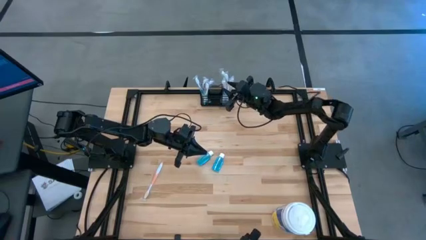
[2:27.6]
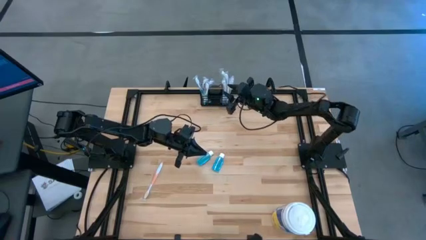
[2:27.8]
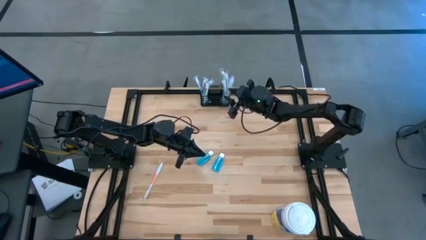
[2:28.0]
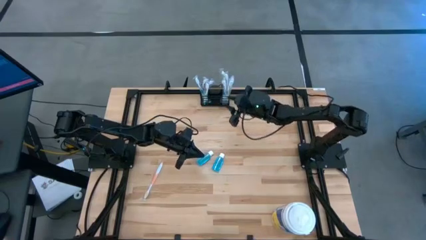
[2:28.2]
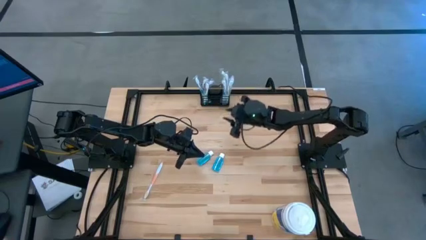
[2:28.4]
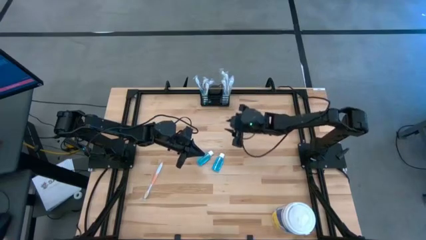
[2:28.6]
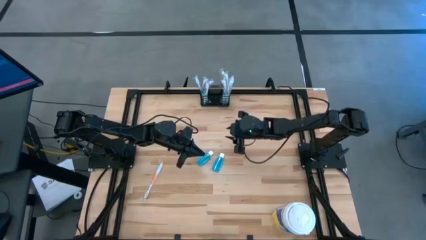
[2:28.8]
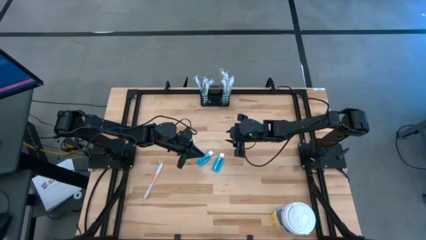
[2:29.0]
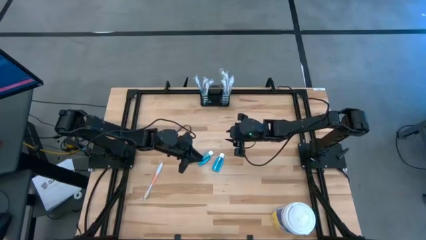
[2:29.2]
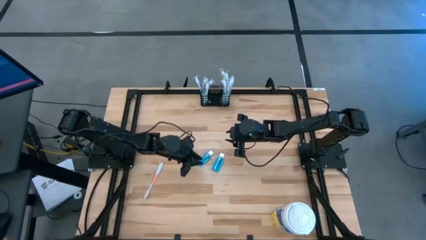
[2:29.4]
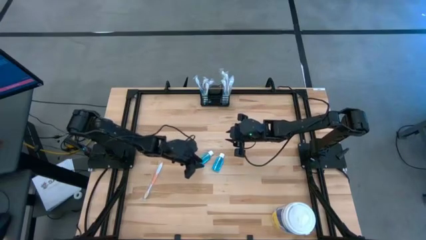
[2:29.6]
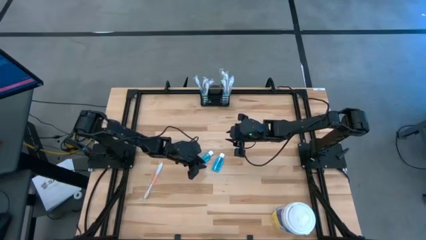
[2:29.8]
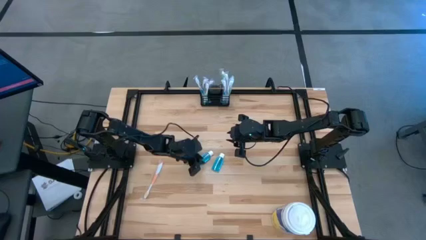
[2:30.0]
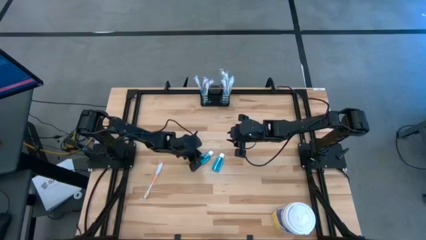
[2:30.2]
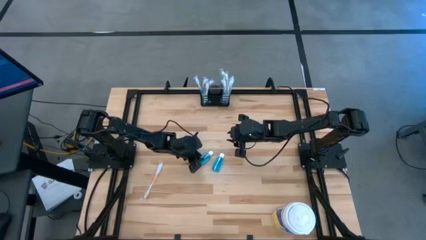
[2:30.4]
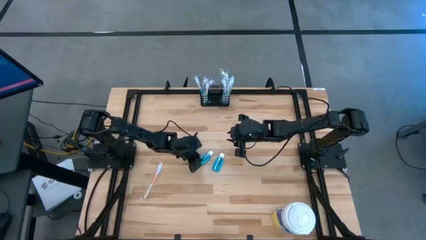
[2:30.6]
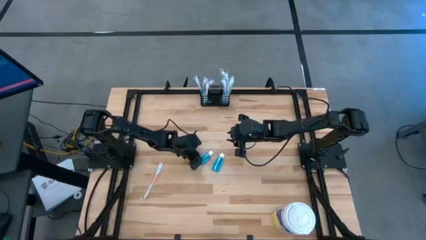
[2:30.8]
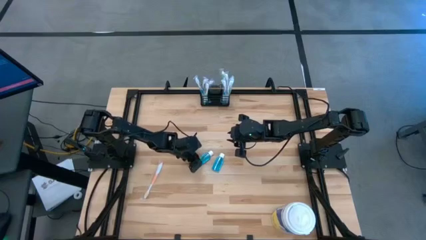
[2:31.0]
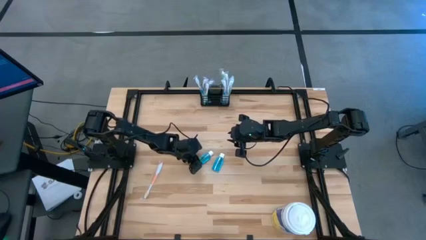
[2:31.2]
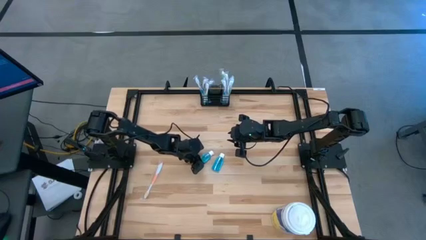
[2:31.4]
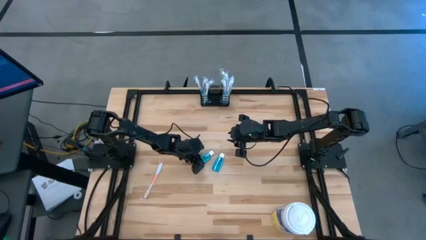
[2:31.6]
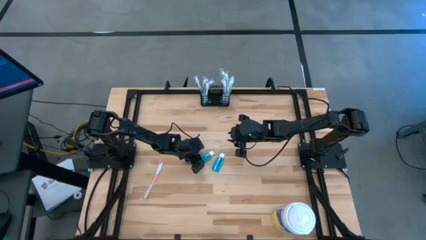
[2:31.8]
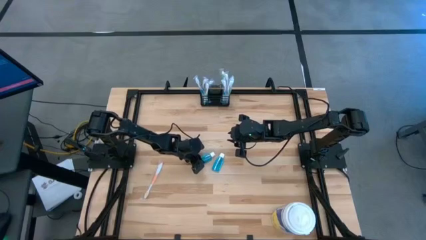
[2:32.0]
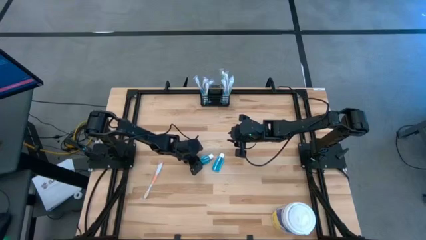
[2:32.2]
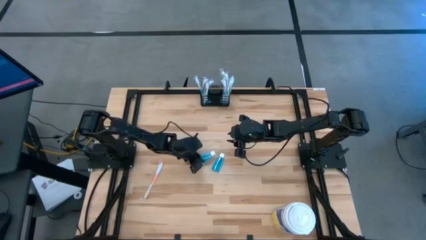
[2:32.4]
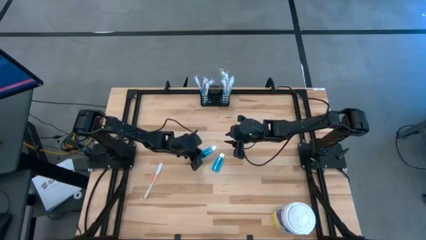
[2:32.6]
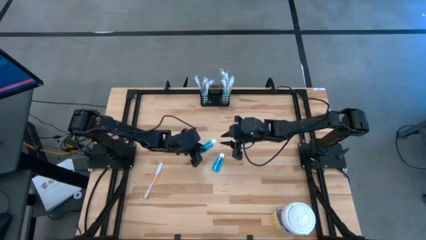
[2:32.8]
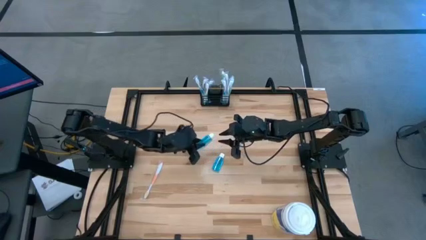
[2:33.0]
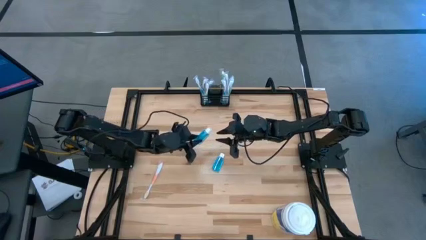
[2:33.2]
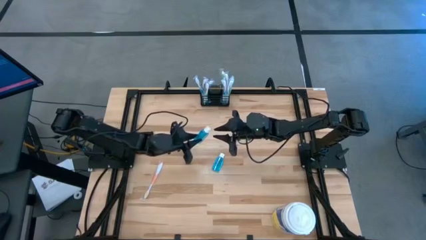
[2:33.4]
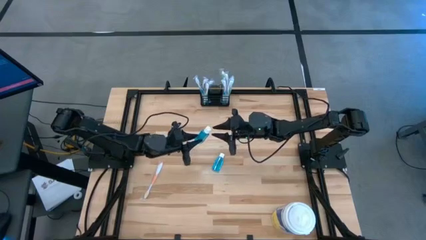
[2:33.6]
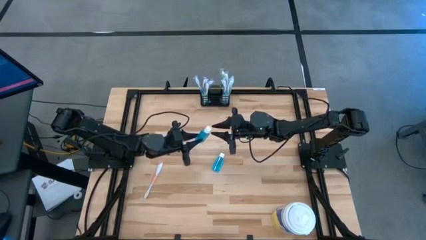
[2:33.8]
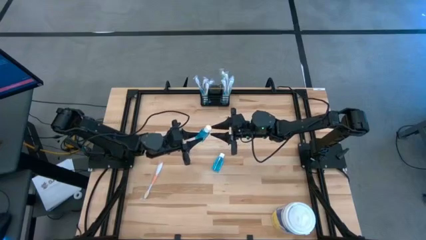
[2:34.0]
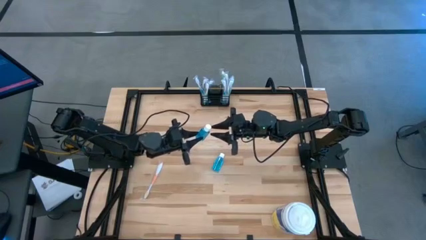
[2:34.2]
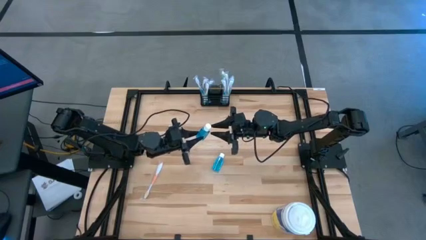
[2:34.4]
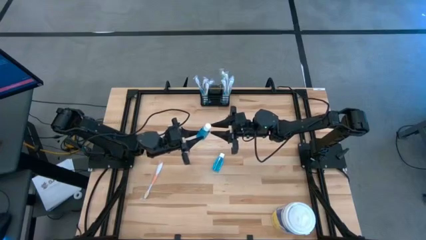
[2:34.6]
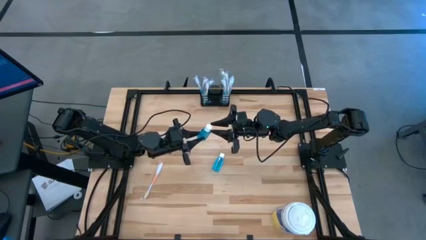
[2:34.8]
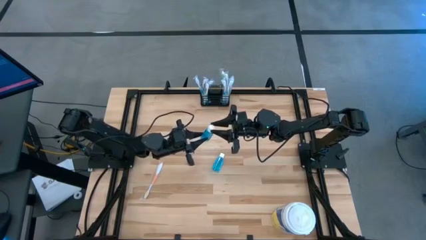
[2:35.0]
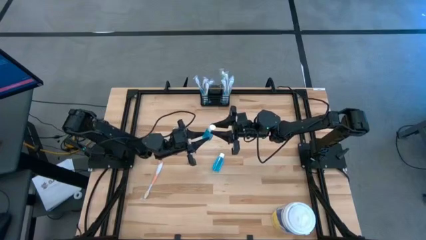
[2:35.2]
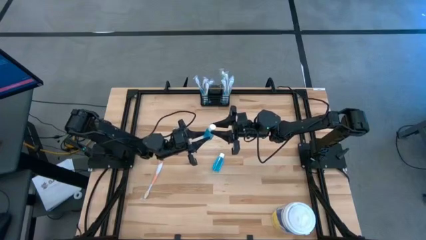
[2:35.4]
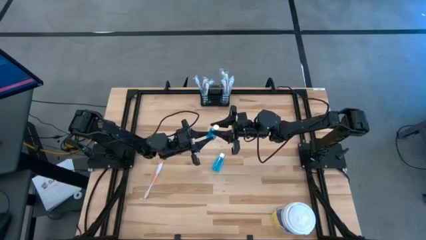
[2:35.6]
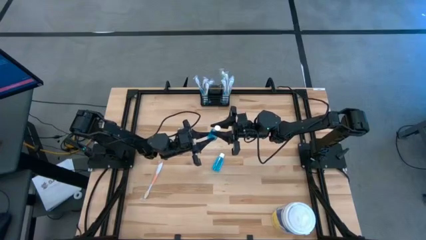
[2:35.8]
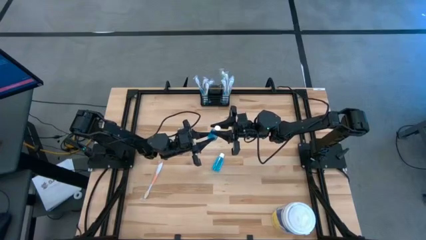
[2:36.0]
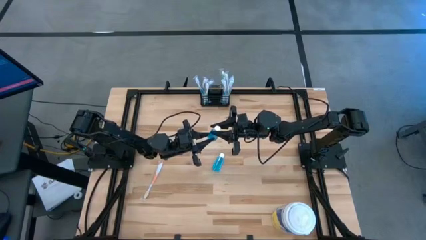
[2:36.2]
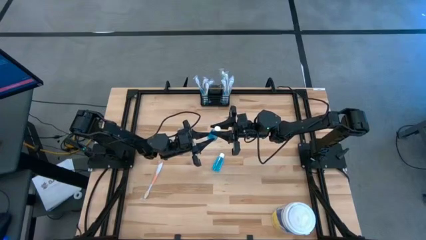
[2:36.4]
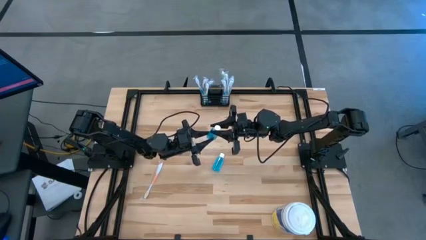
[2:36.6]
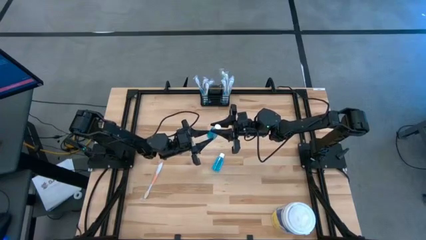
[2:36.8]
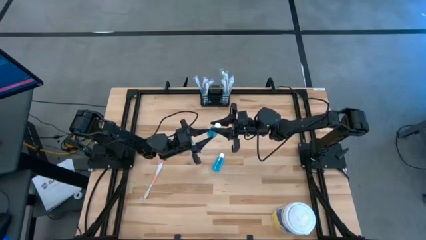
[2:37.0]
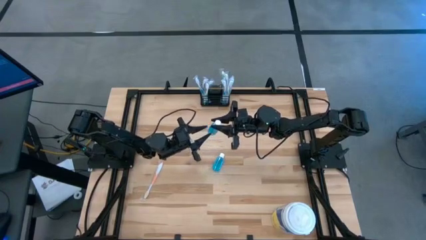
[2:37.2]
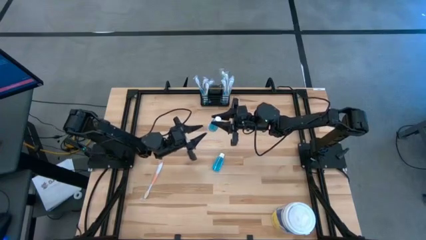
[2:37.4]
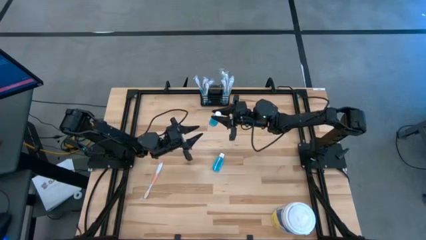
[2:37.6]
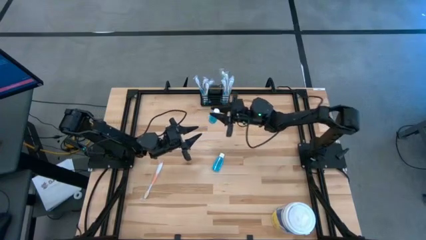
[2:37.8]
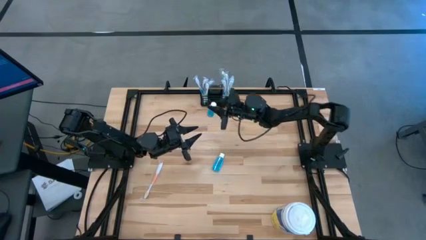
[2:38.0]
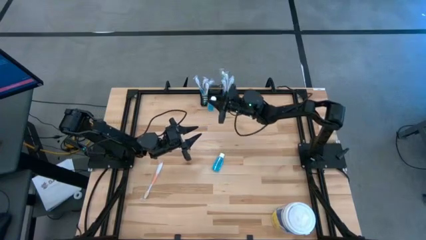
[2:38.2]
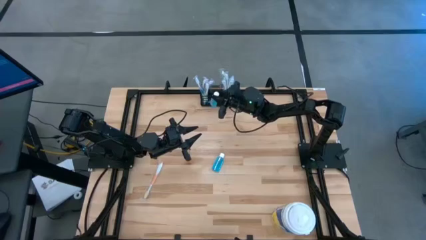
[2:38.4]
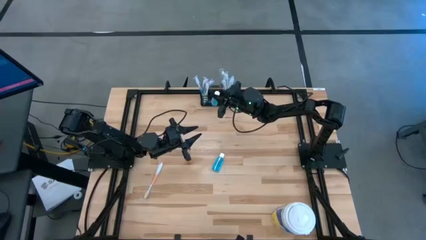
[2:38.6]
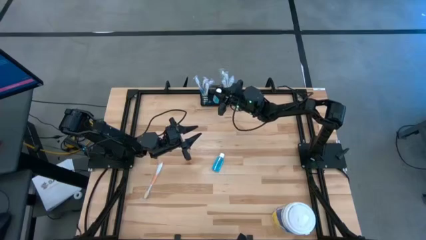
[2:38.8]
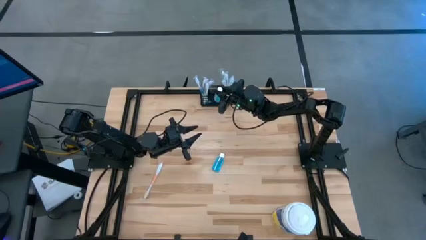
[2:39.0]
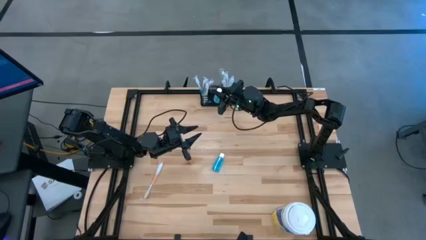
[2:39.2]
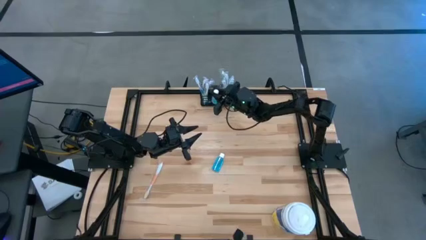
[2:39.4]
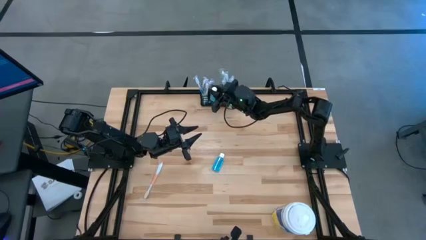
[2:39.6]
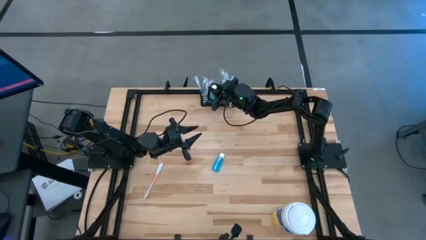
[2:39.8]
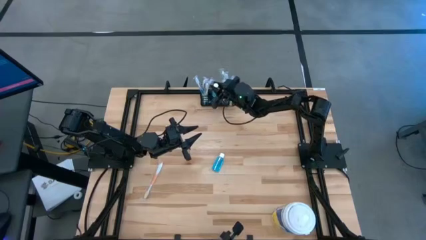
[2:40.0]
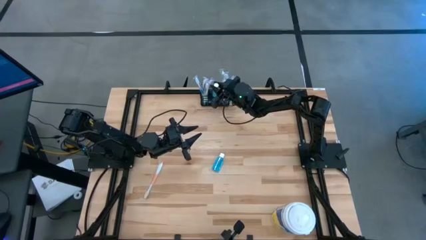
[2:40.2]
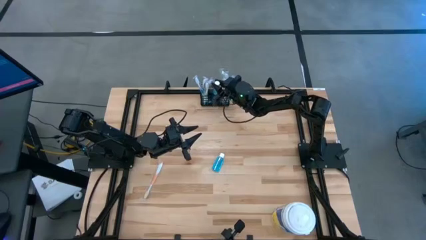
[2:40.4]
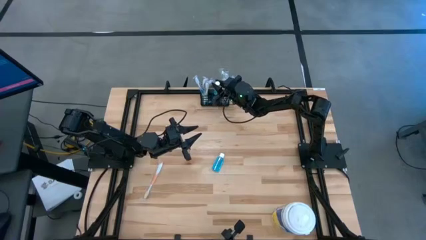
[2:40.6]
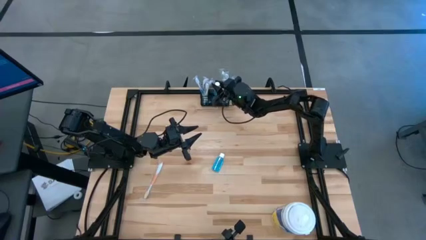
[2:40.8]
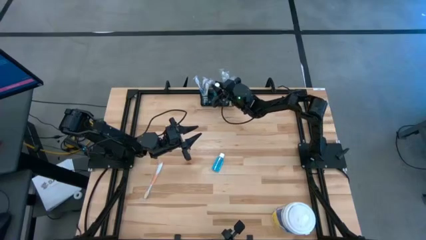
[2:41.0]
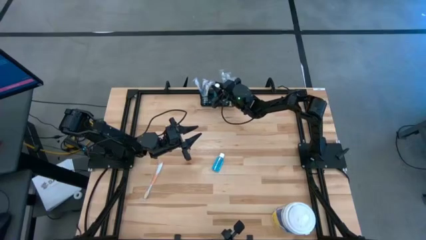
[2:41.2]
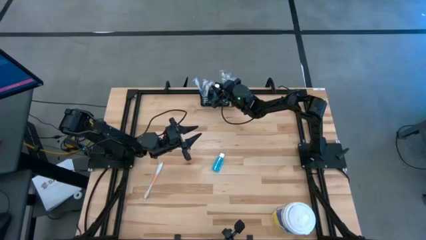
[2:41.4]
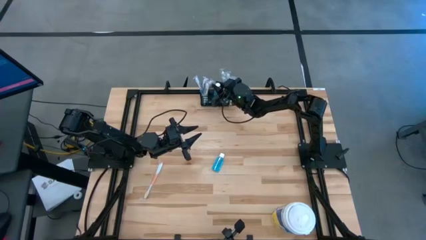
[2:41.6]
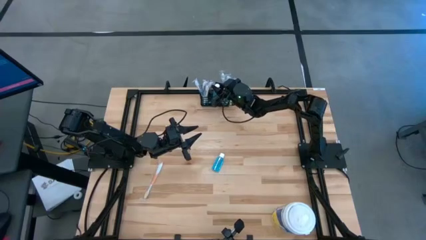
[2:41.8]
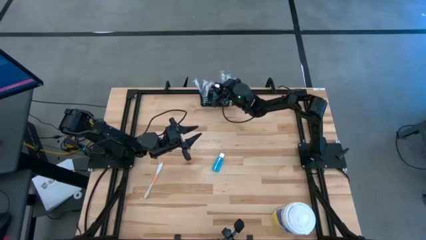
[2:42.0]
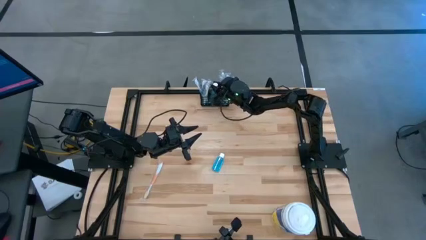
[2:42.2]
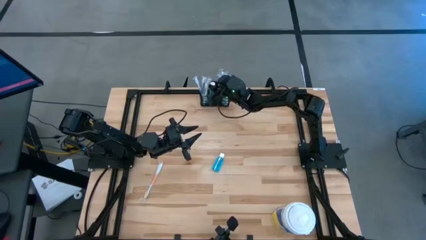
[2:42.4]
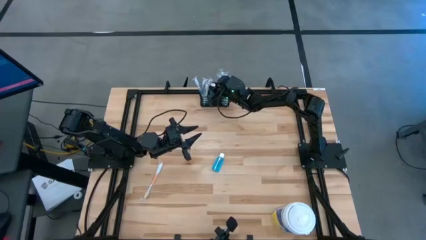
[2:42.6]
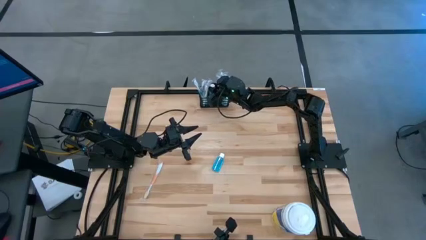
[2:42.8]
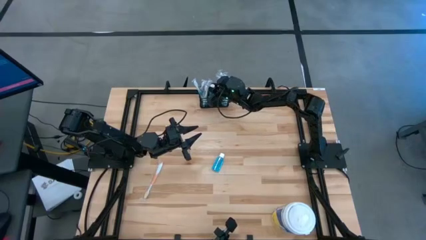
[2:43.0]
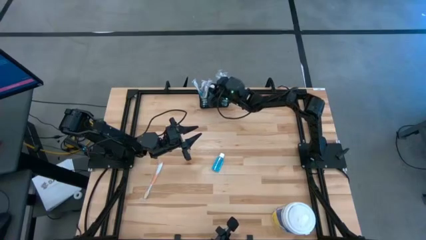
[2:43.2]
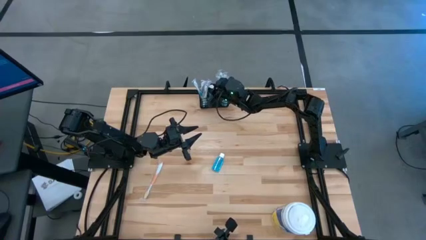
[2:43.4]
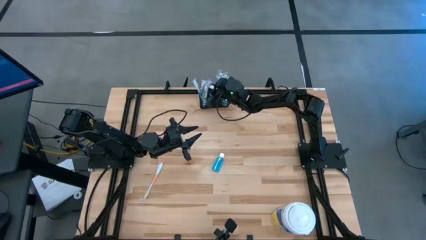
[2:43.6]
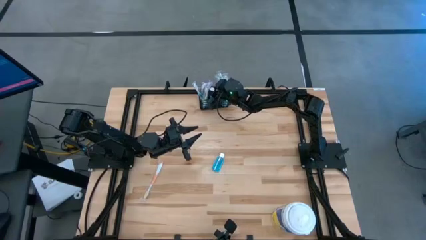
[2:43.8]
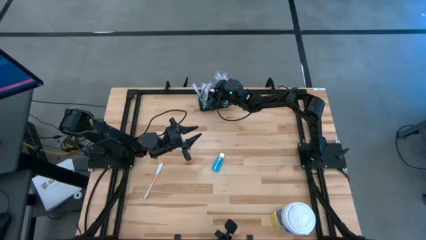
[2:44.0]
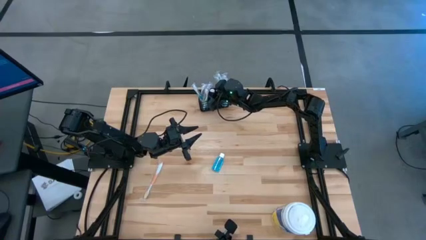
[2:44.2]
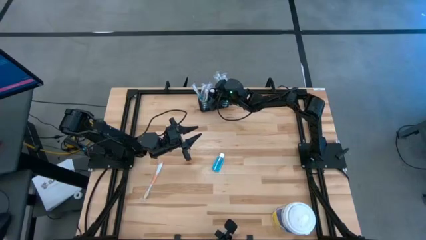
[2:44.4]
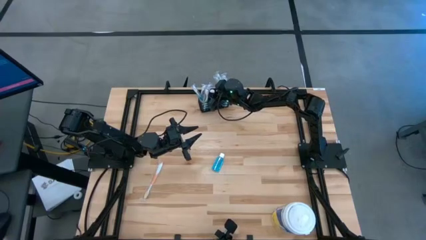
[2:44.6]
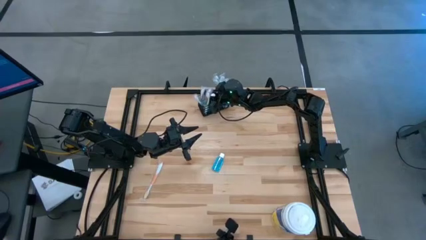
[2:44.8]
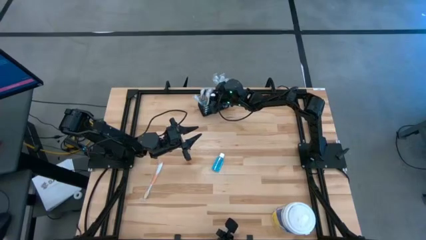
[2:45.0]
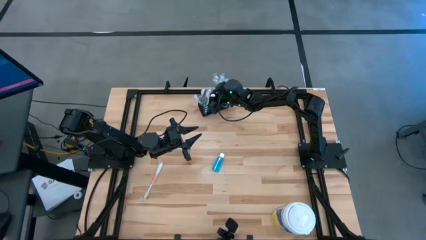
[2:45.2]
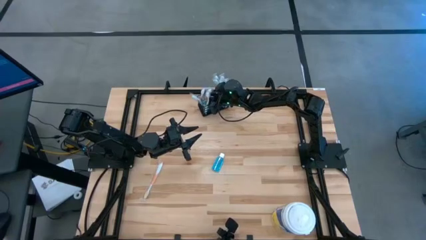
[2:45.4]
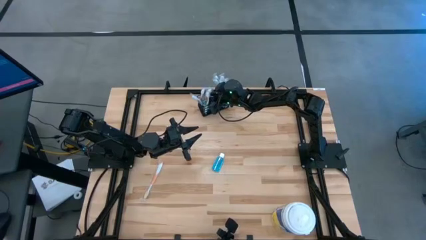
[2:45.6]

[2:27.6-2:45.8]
Task: Pick & Place toothbrushing station
Put the left blue mouthwash into the black wire organizer
